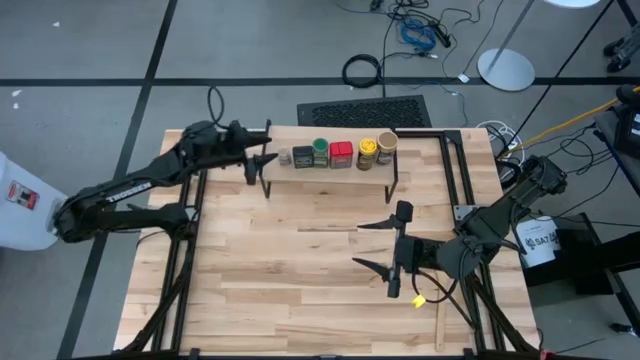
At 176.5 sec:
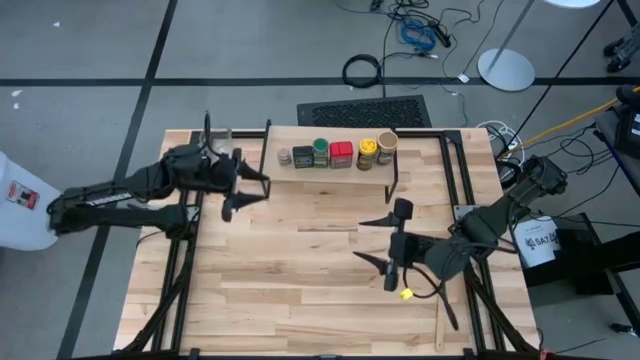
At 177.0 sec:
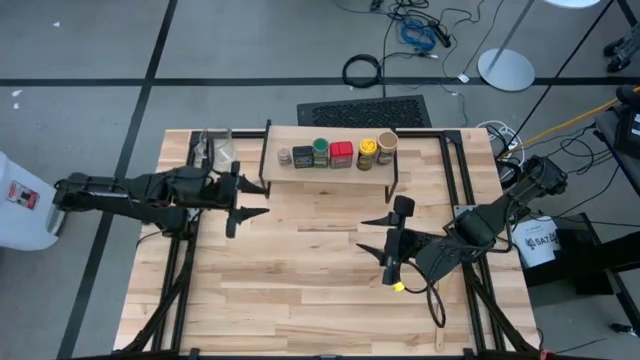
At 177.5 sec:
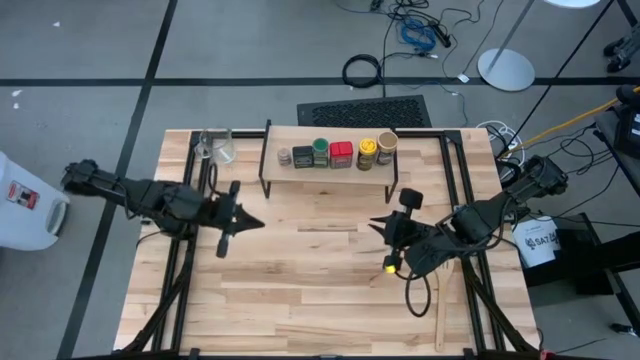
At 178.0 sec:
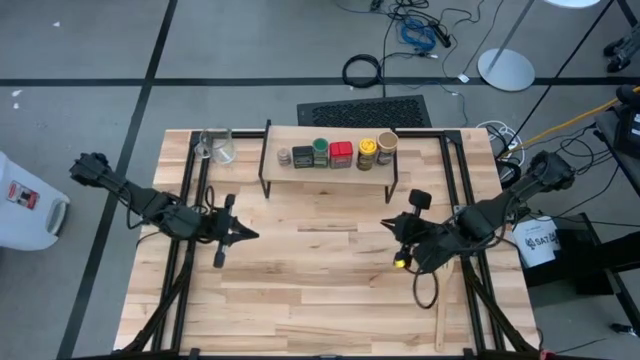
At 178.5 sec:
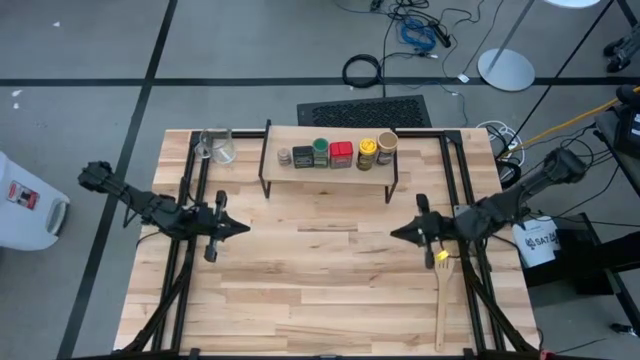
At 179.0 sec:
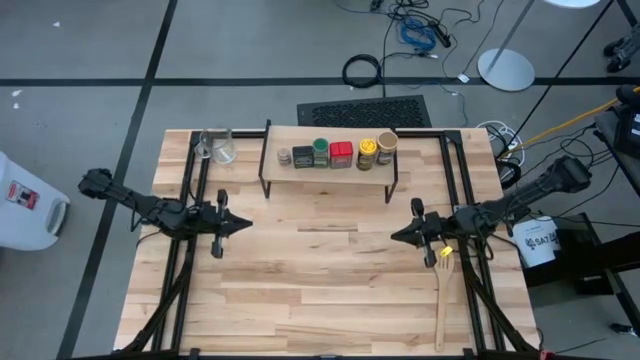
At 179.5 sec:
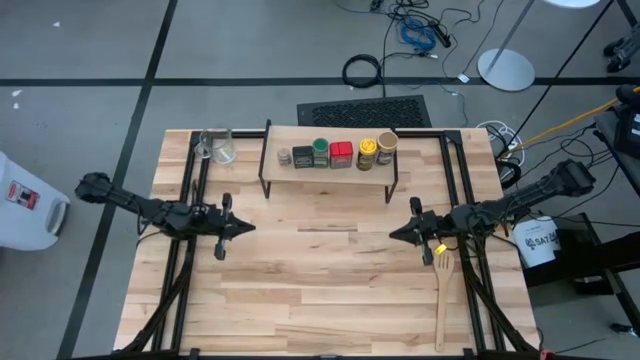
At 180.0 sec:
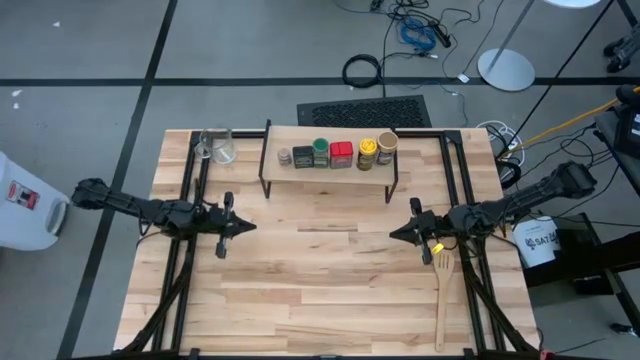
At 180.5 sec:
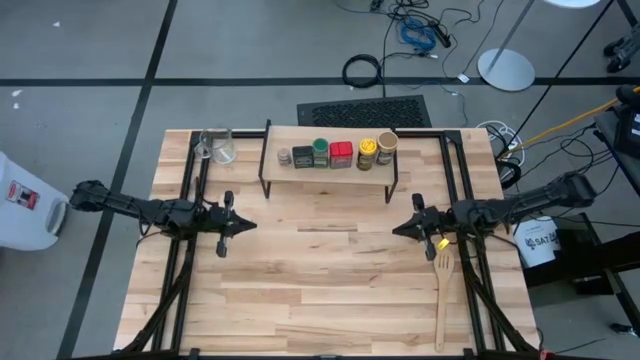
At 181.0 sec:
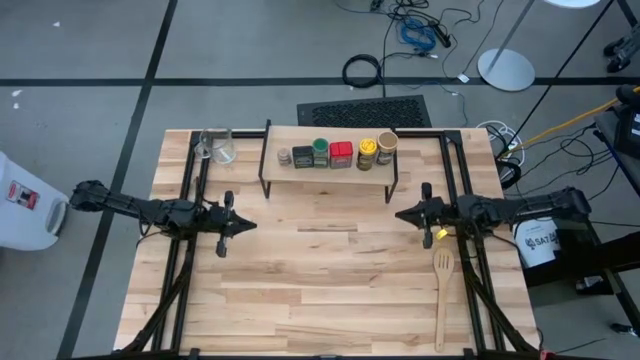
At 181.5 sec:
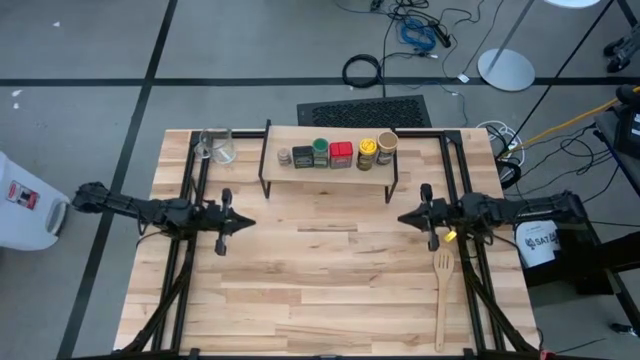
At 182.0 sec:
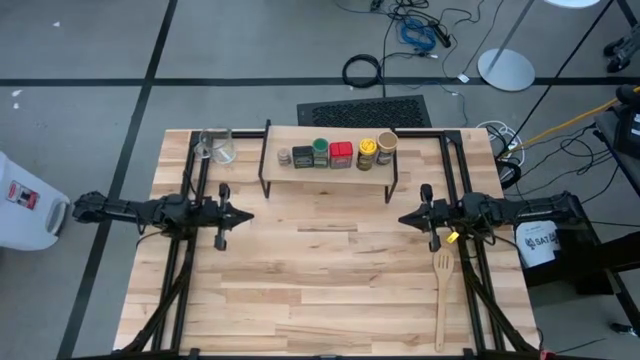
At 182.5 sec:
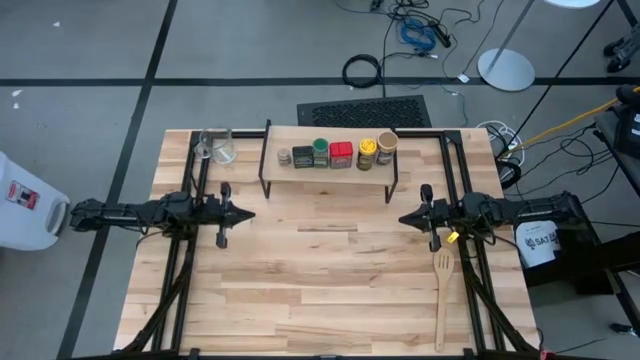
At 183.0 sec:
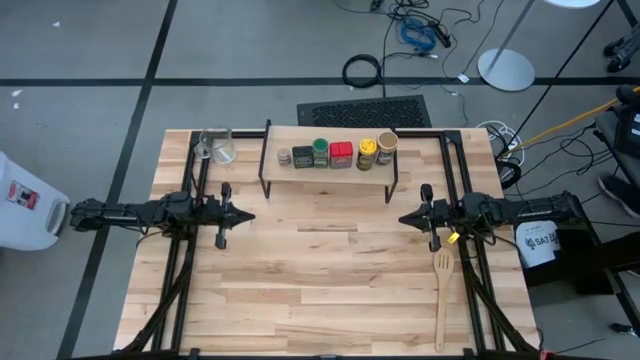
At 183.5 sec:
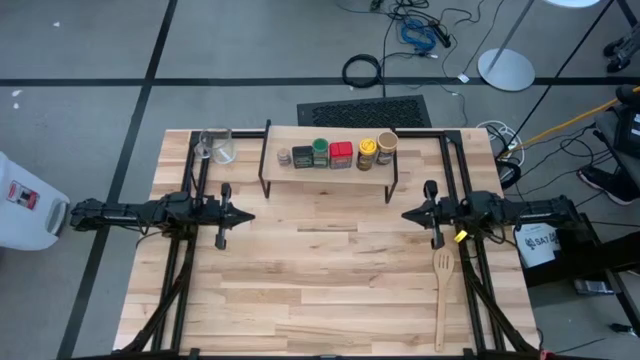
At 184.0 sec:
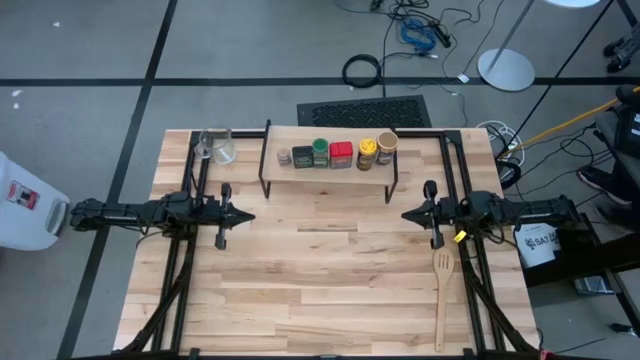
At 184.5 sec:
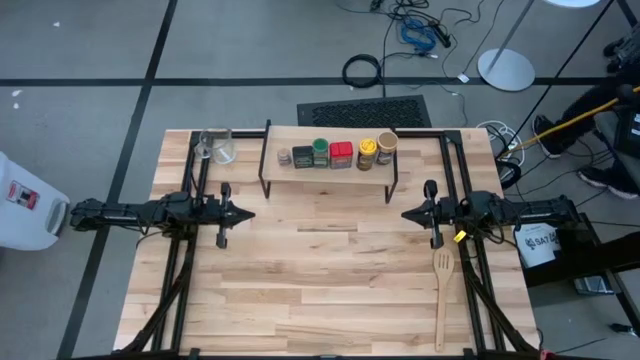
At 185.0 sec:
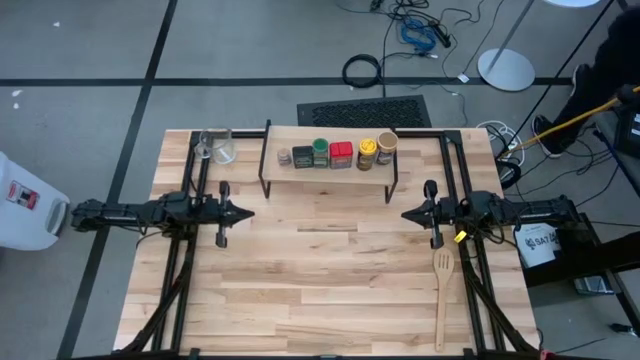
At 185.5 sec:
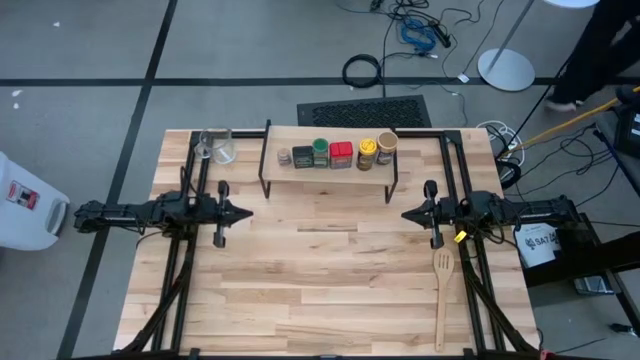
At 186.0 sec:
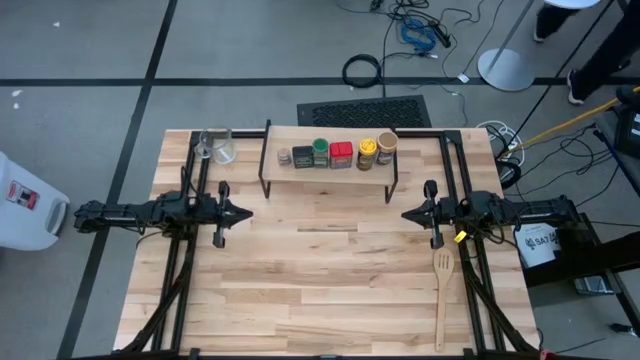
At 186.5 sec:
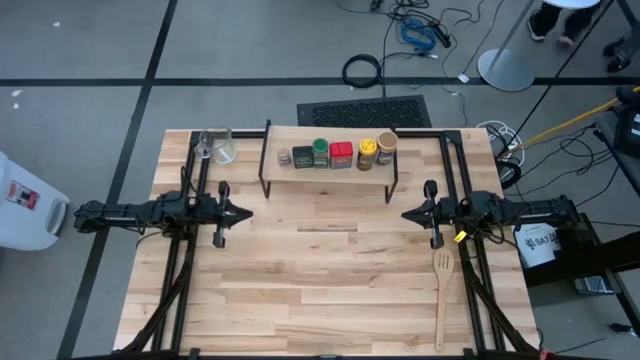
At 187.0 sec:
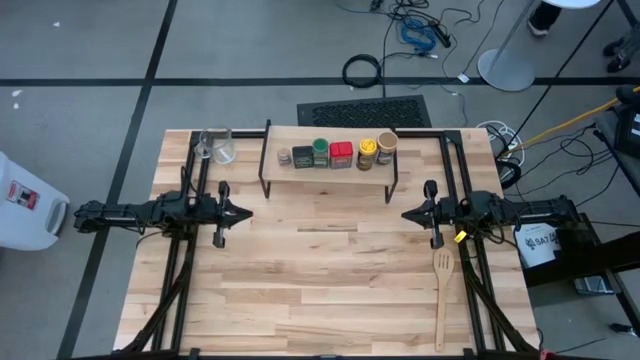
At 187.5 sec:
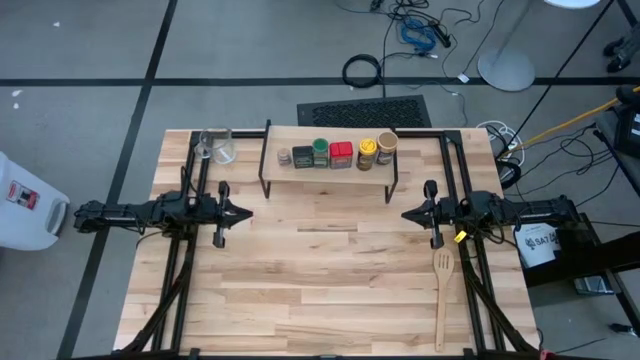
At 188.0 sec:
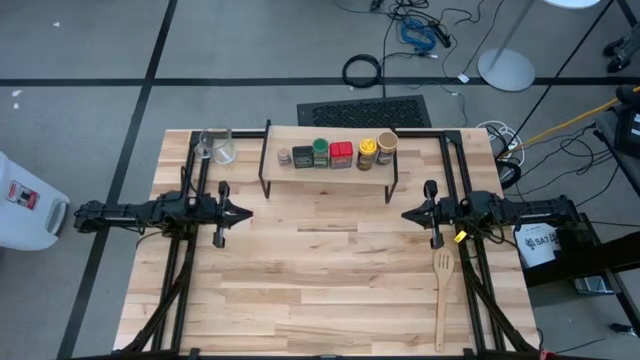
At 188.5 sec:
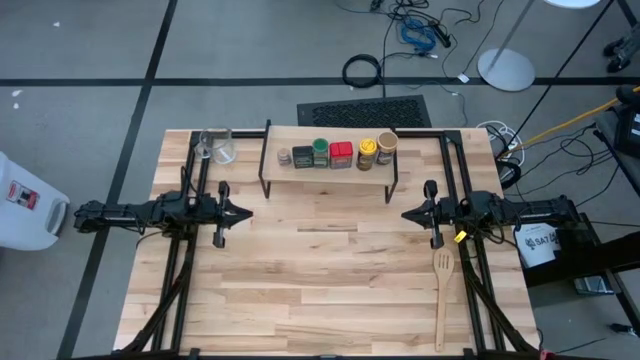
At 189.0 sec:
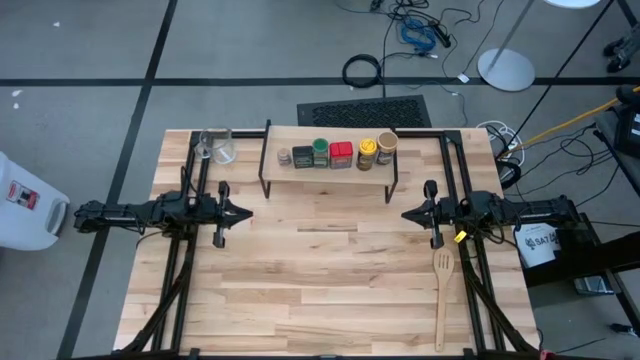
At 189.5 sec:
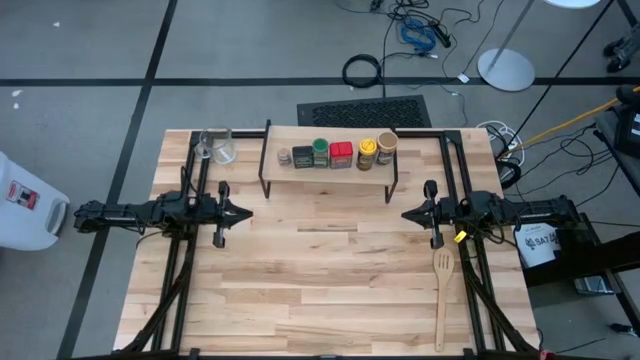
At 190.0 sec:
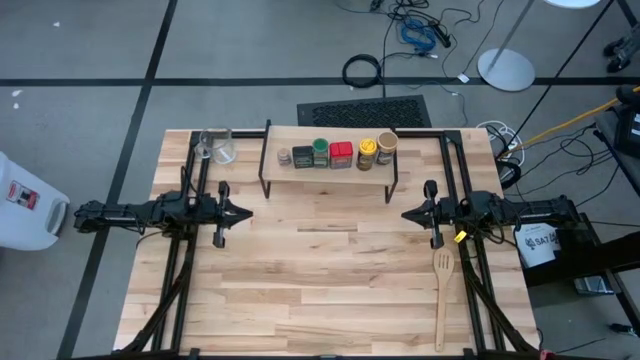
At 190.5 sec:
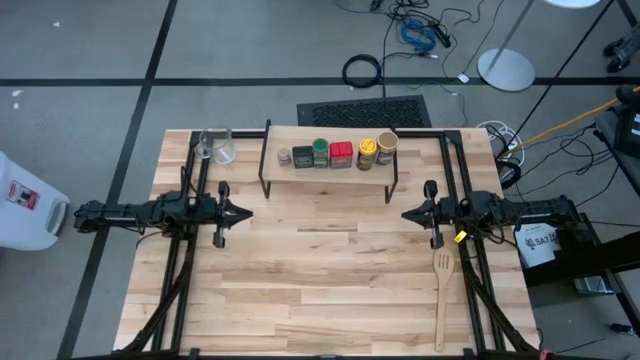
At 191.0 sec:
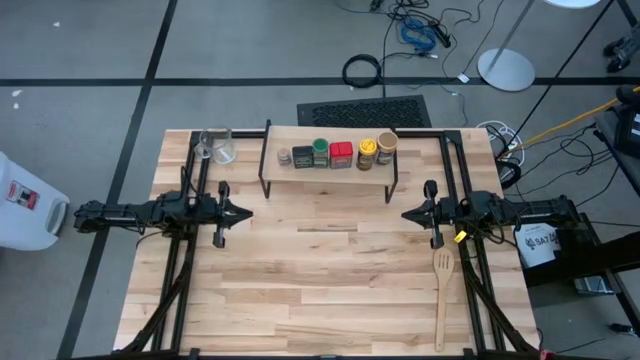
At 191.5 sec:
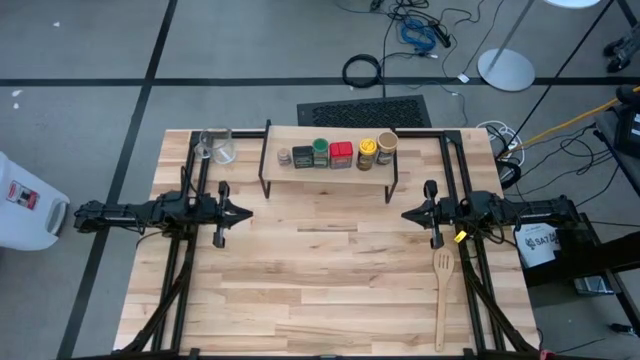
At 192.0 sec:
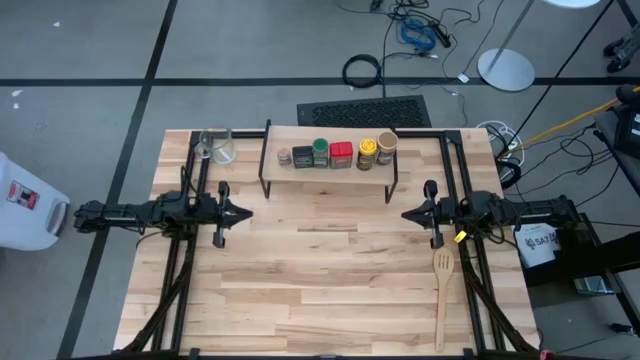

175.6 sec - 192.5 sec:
Task: Shelf spices
Return to Home Position
